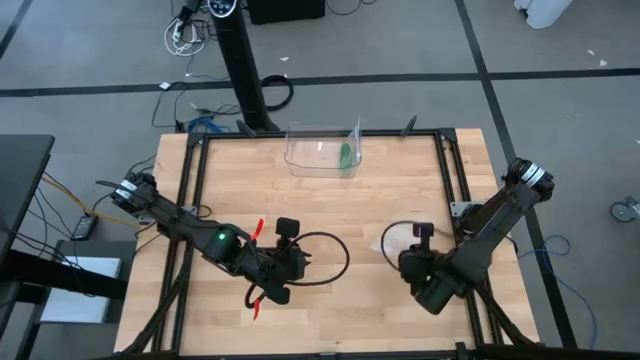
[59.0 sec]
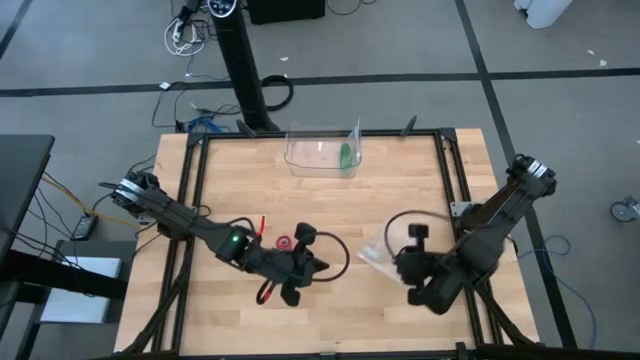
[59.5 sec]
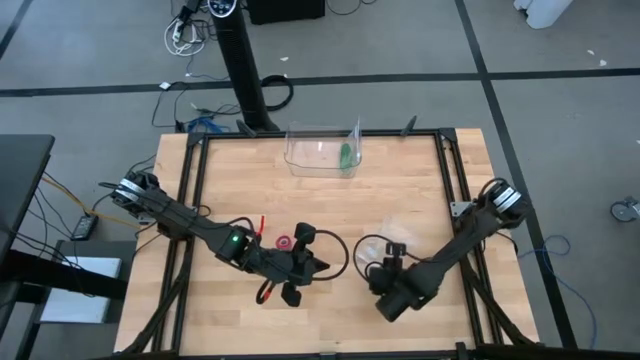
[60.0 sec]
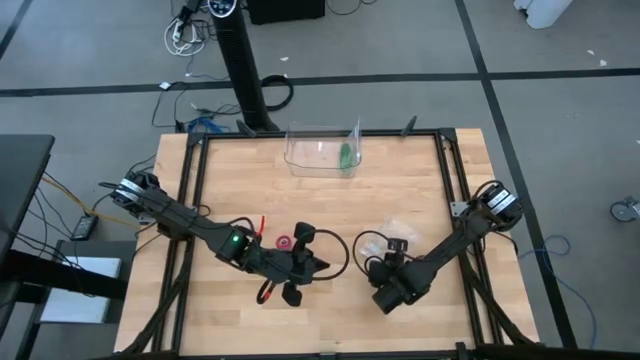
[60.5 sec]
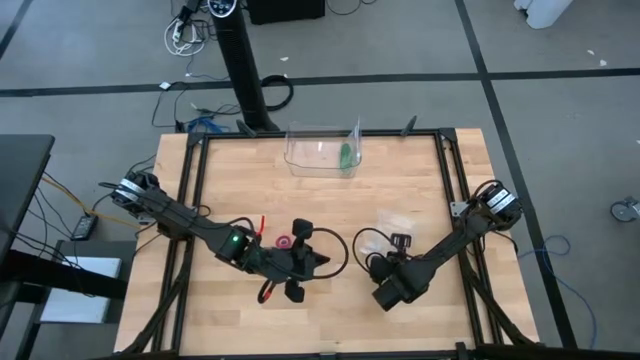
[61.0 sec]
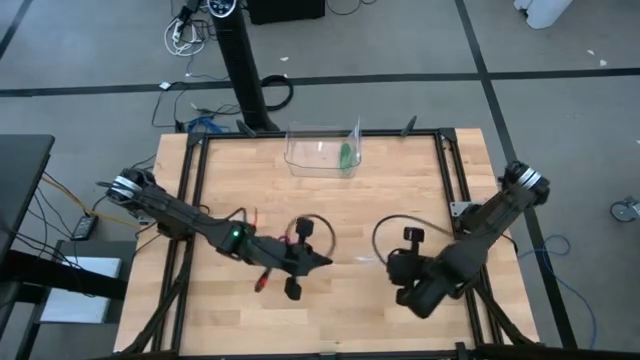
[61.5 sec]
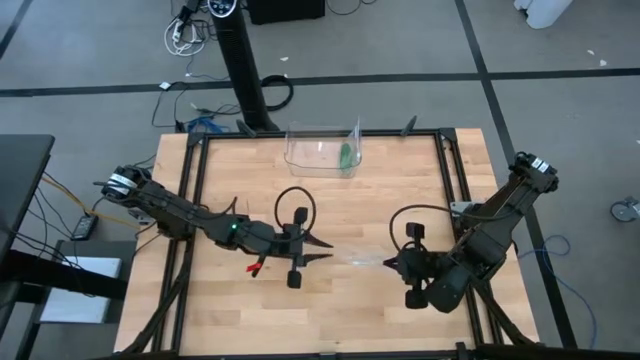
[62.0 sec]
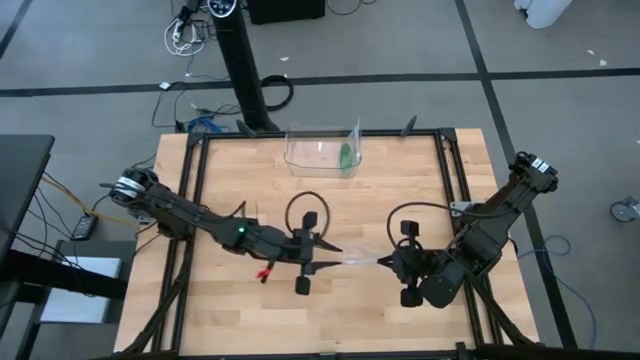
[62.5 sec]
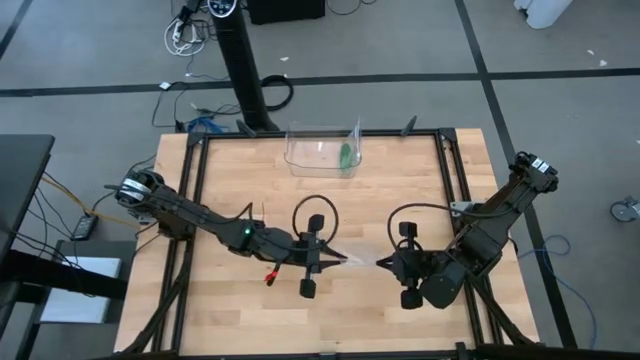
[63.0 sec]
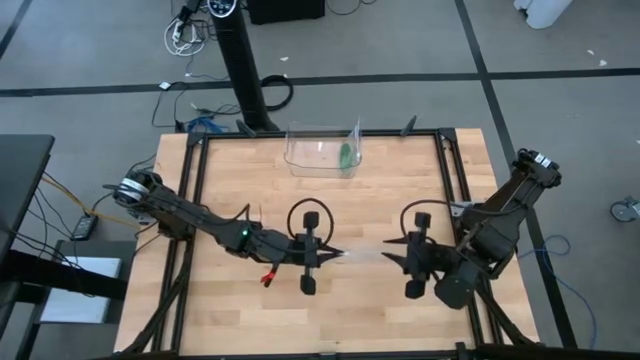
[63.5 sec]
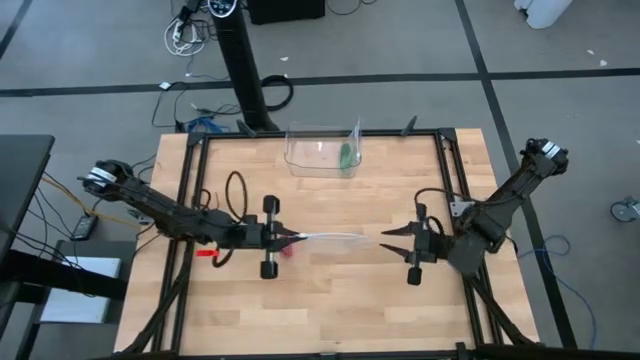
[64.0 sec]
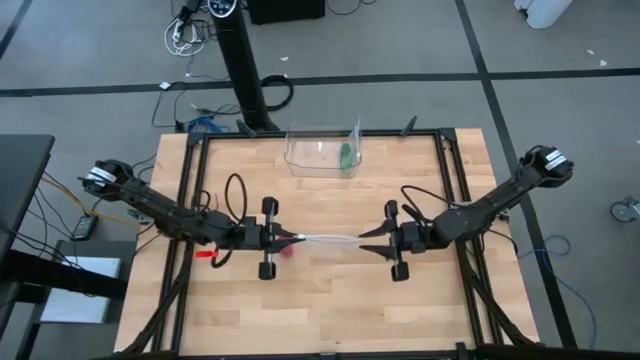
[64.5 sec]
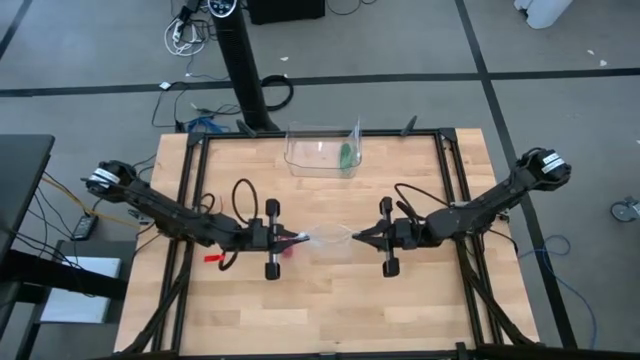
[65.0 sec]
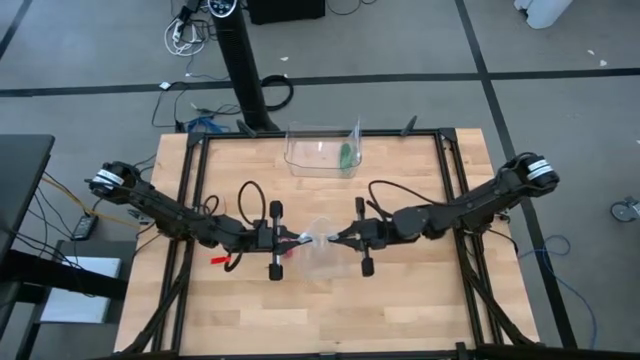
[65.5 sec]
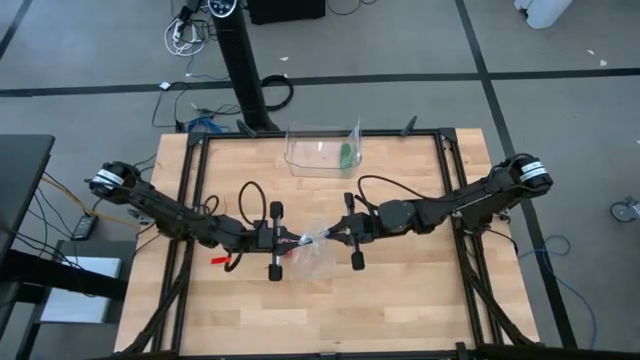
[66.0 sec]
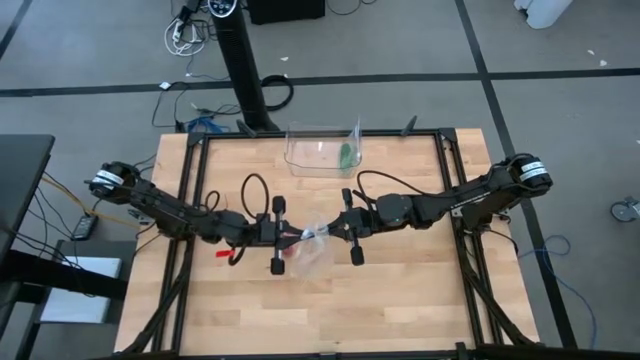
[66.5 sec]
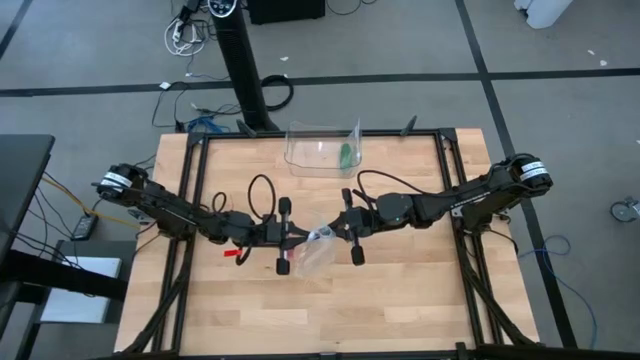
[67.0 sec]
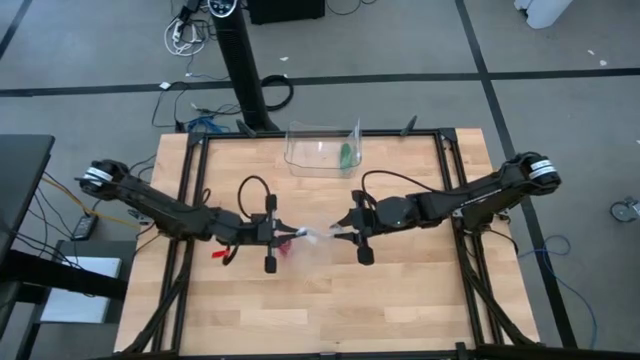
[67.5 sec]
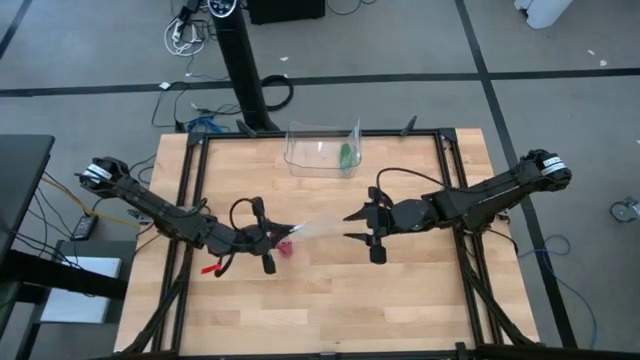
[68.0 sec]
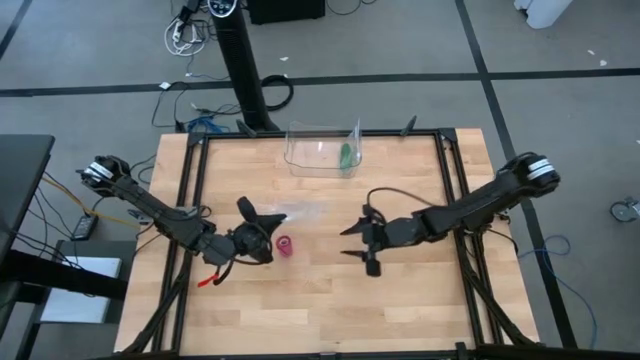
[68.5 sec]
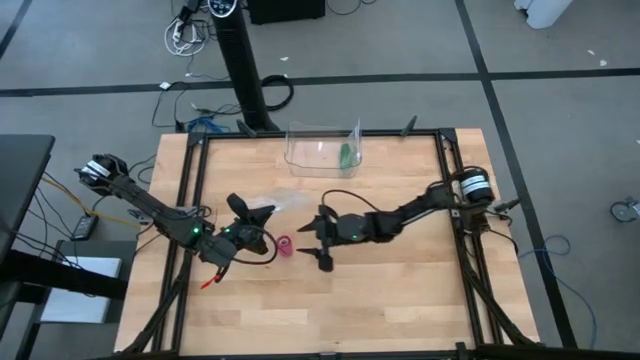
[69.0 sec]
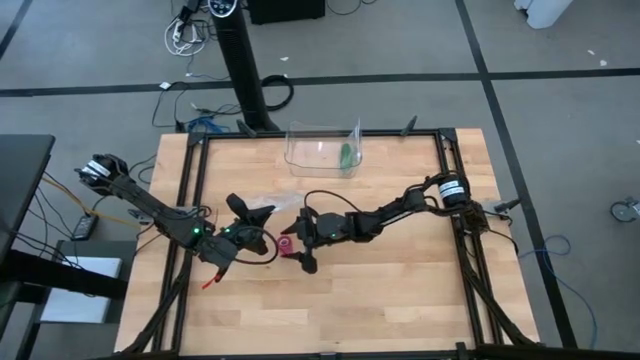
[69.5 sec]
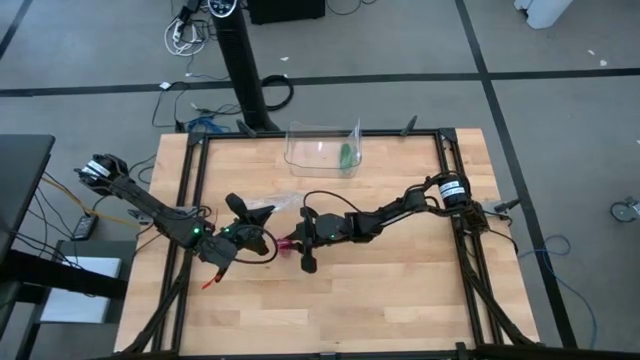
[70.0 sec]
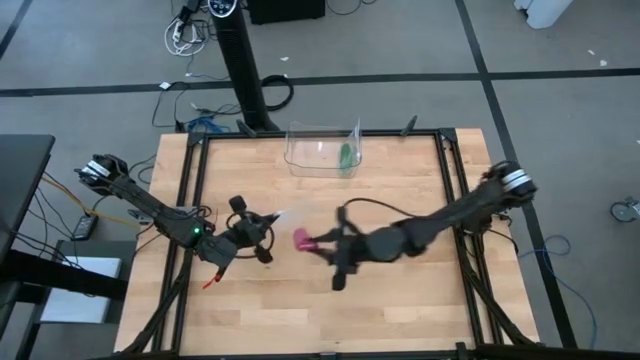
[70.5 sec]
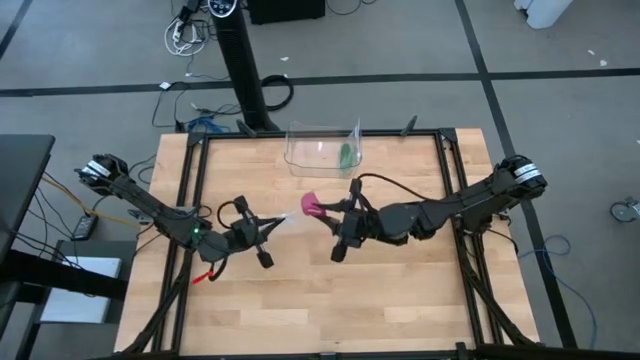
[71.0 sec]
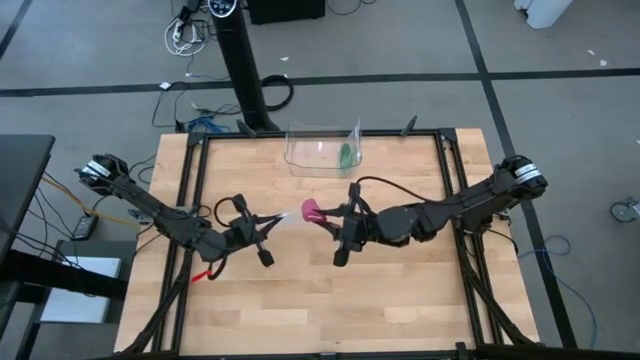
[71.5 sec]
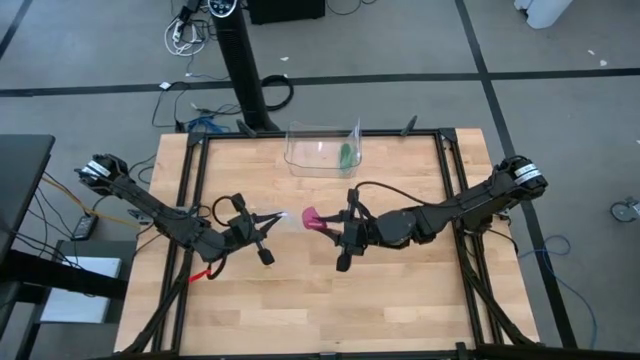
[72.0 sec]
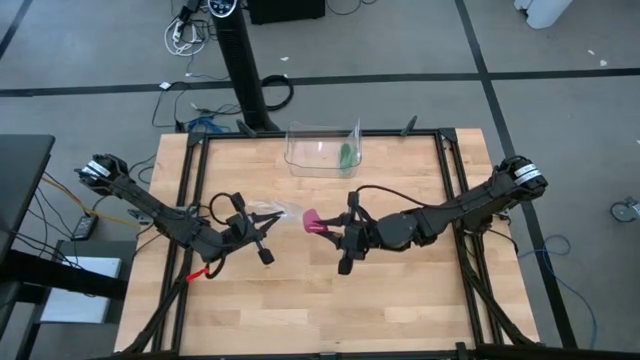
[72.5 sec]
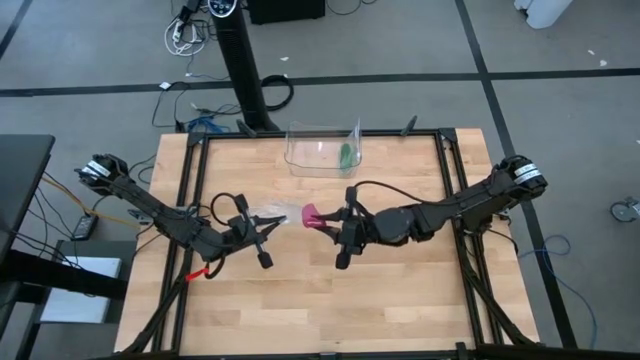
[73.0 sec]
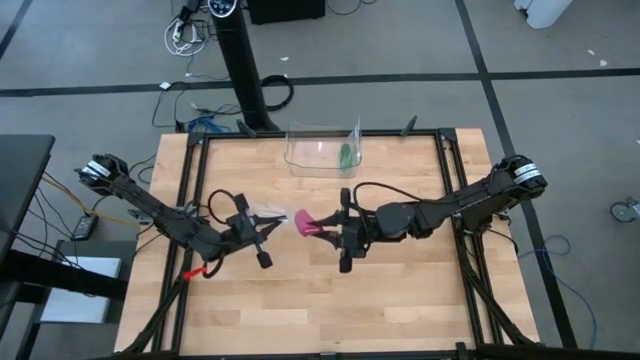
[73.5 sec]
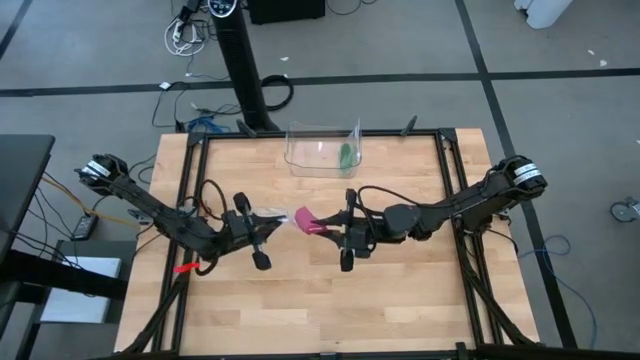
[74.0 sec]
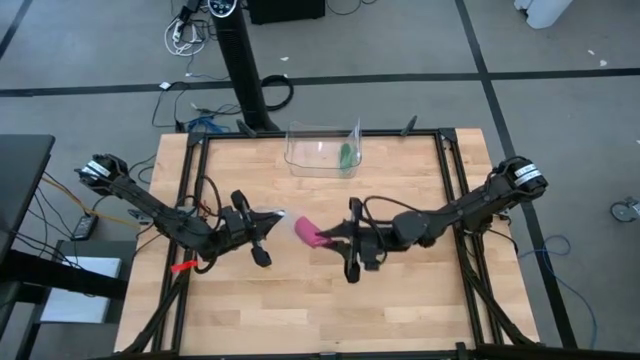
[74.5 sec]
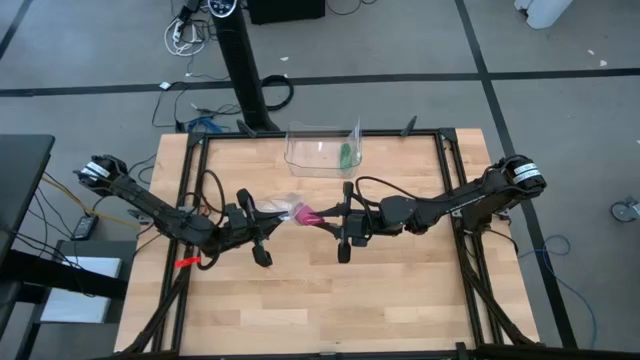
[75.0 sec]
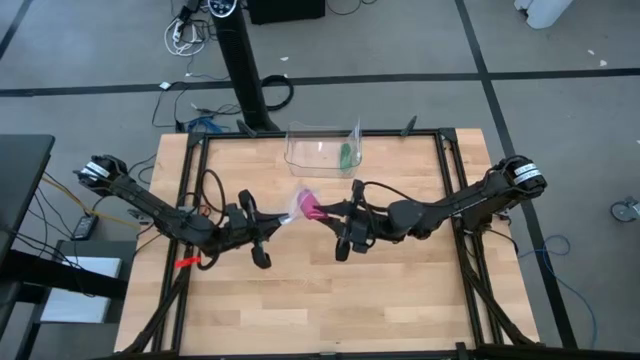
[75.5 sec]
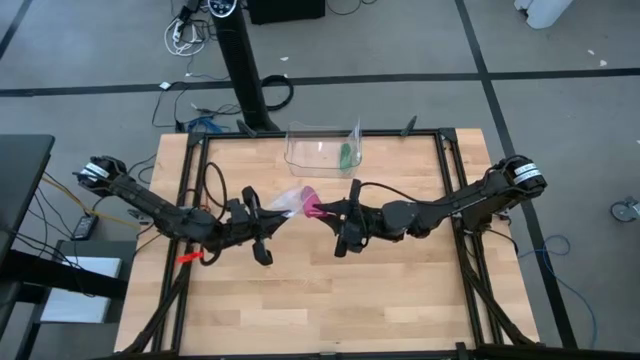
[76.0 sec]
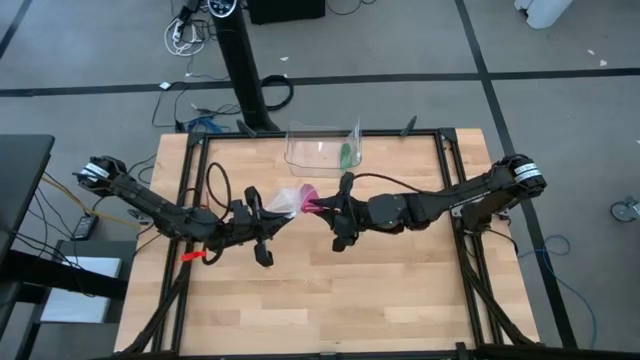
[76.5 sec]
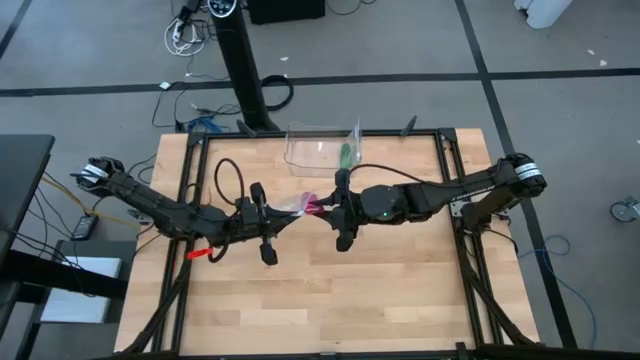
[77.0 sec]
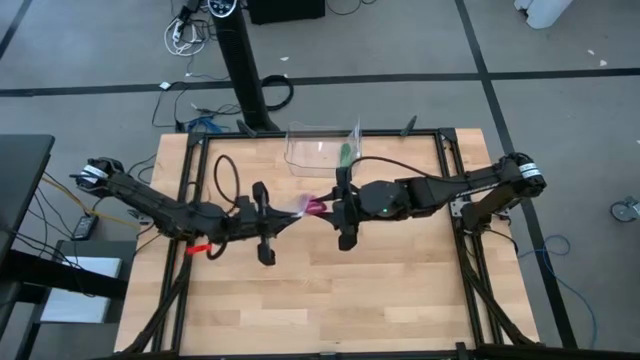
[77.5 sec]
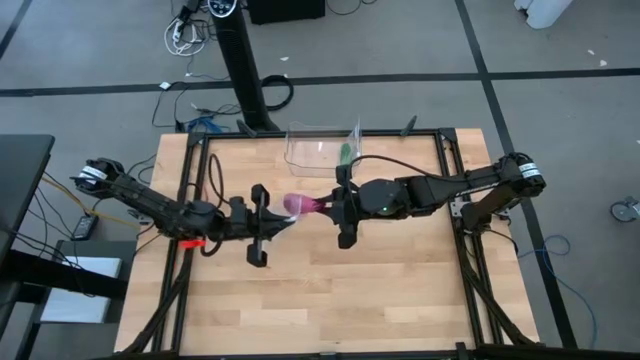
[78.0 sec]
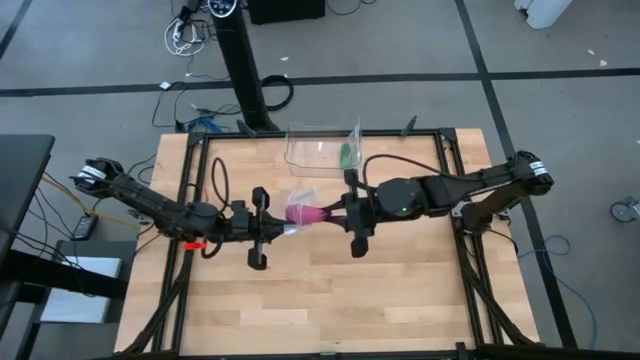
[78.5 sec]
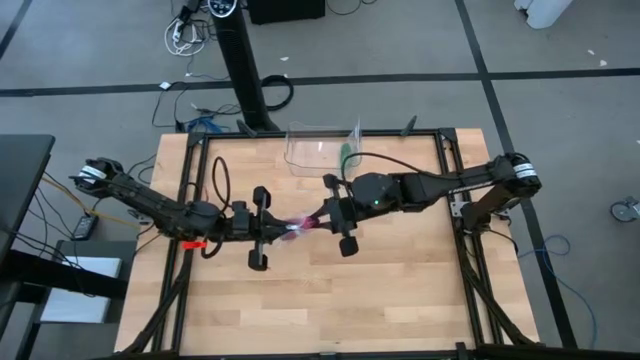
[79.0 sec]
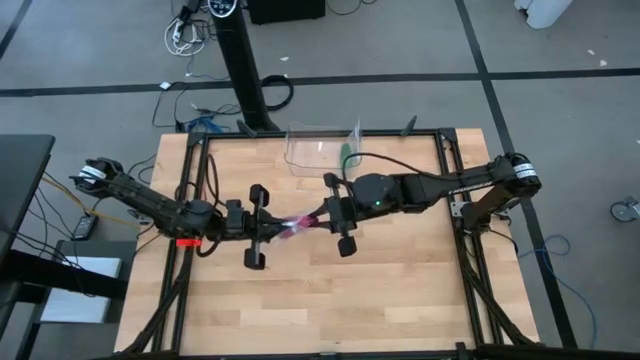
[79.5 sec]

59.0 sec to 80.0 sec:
Task: Roll bandage
Put the pink bandage into the transparent zip bag
